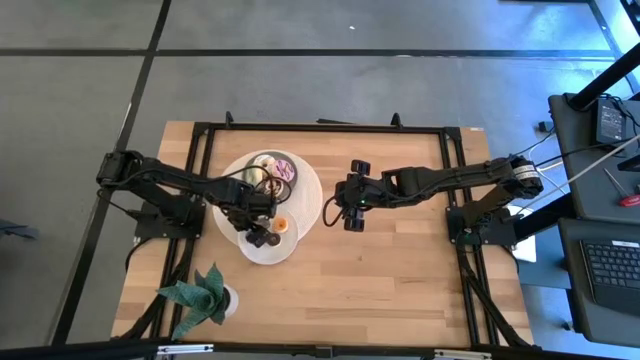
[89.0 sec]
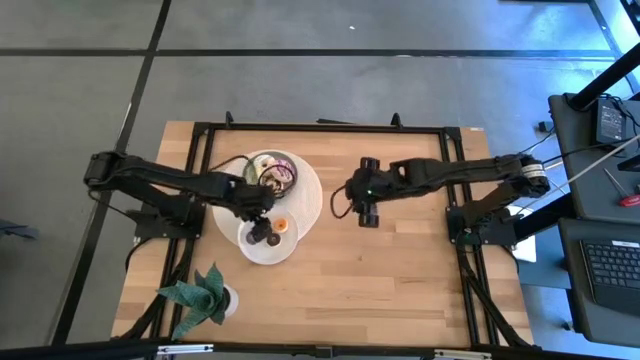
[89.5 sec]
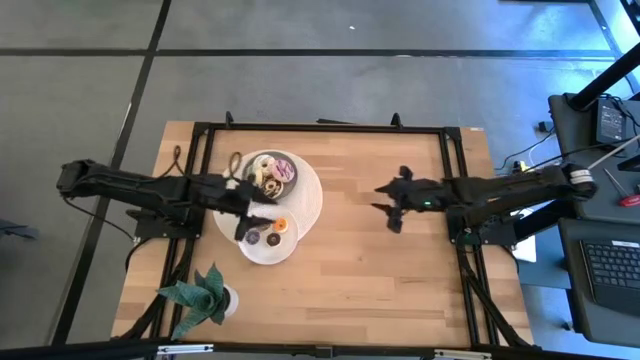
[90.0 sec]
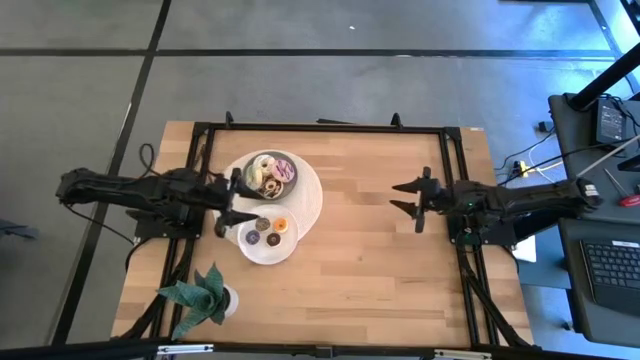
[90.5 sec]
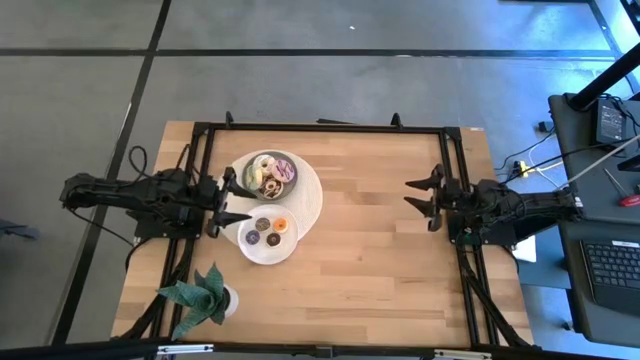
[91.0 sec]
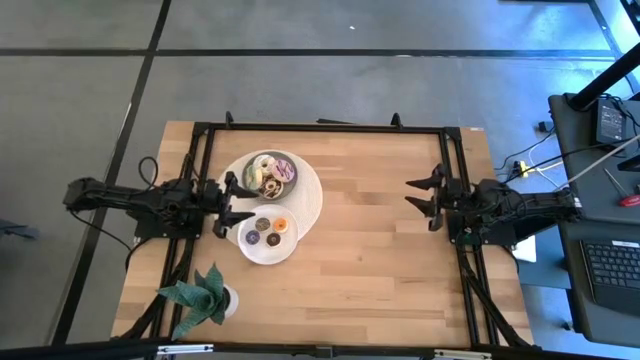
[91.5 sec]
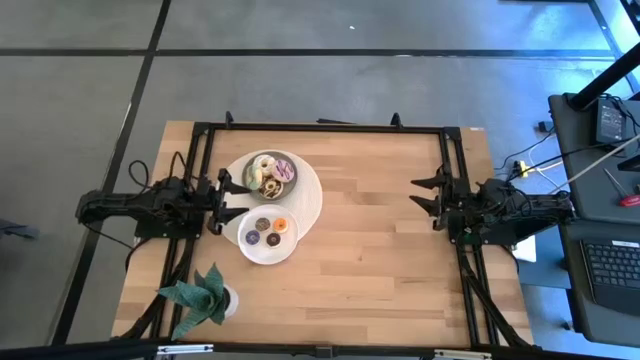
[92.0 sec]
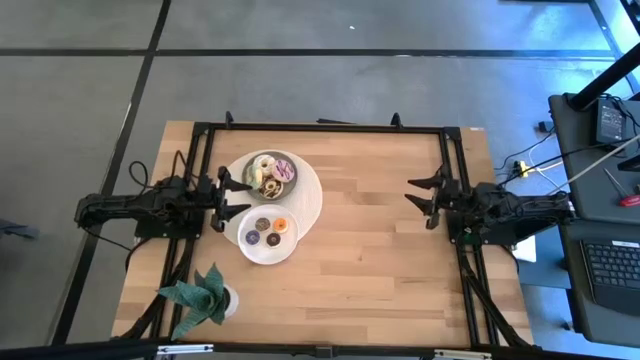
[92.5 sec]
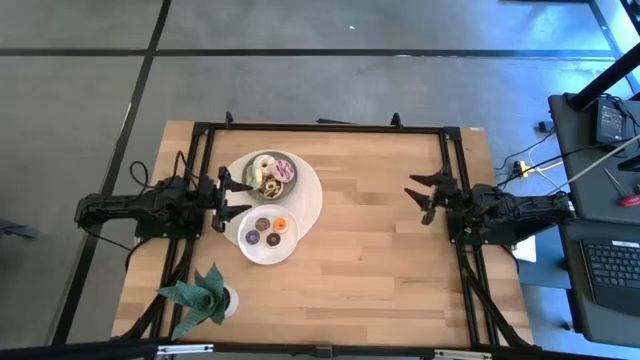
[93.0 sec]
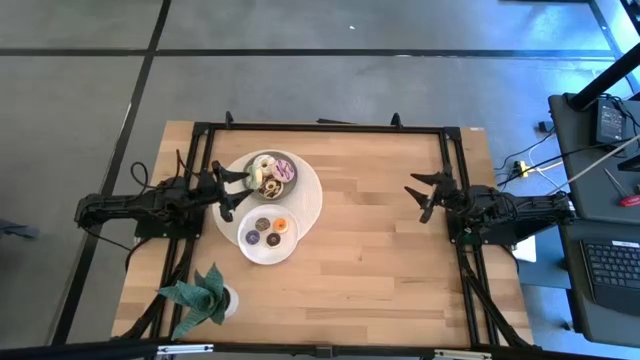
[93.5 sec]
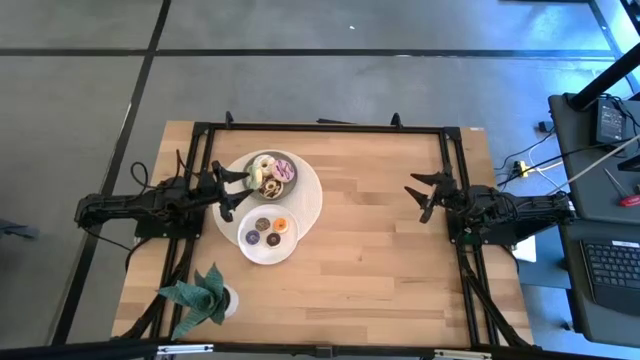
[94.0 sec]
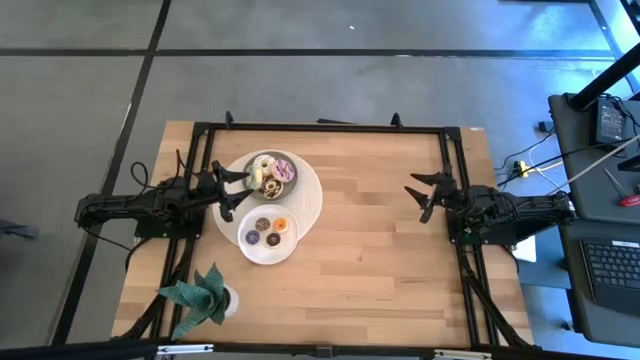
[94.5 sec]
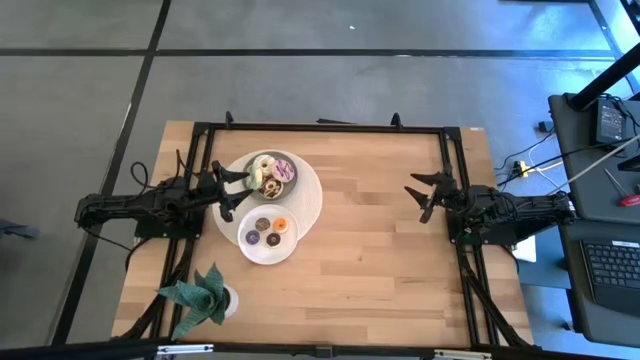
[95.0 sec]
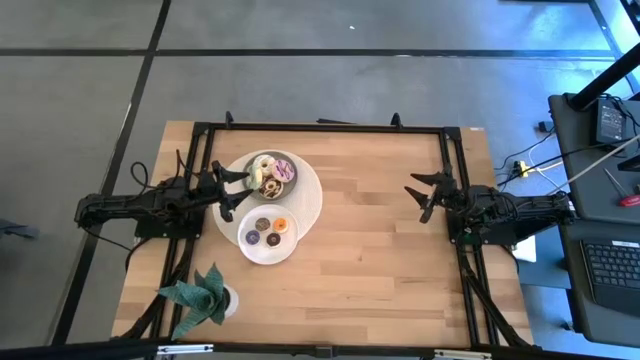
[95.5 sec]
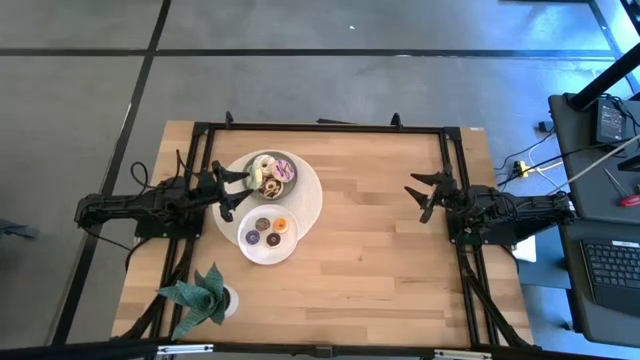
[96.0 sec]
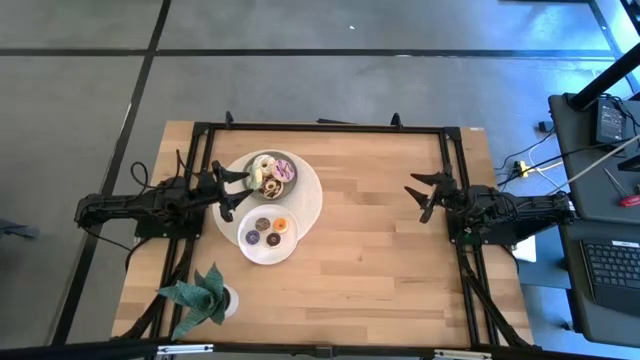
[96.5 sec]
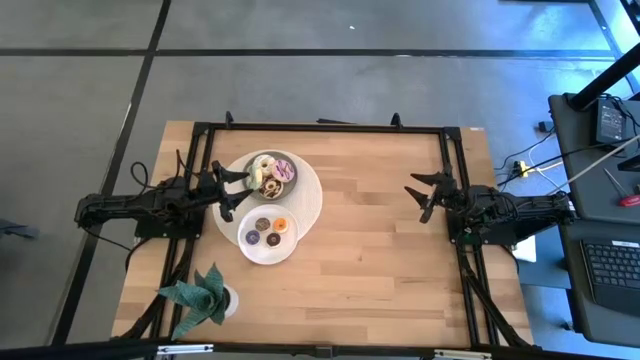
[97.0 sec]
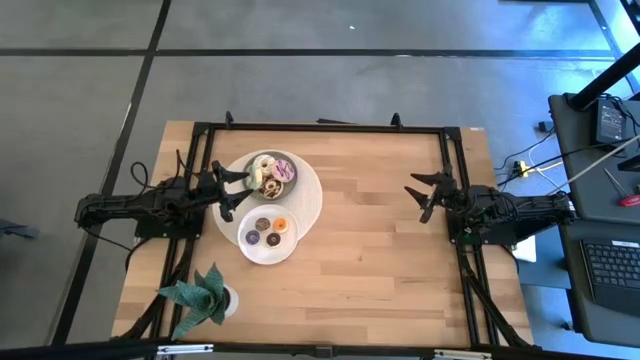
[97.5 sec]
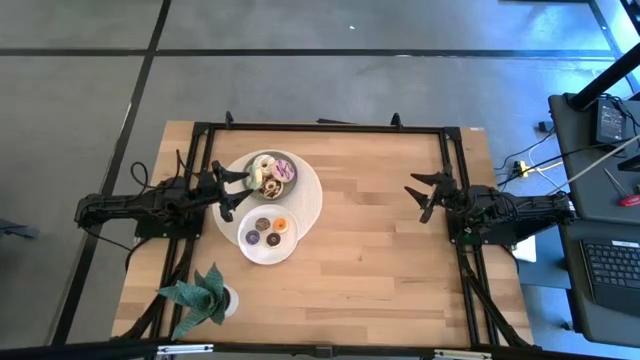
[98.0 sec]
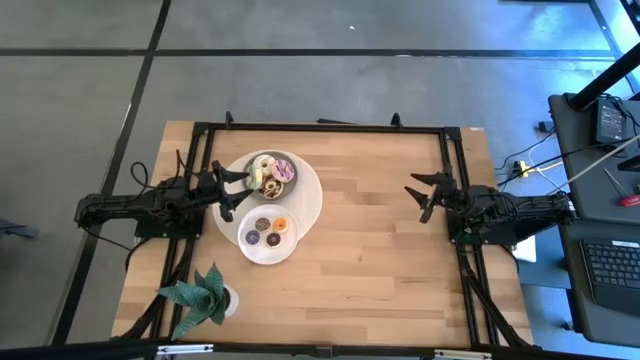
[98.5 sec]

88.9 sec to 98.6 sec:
Task: Pick & Place donuts
Return to Home Position

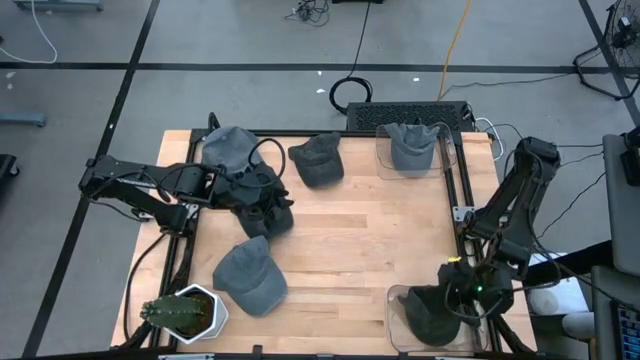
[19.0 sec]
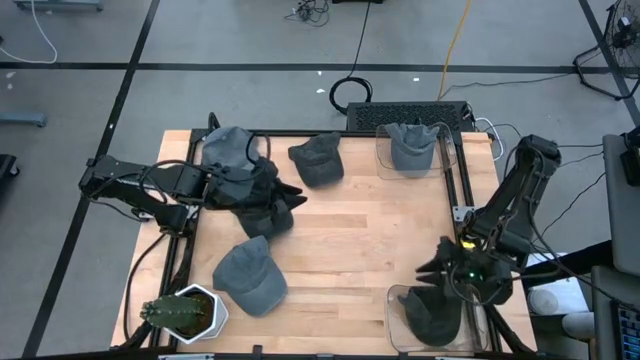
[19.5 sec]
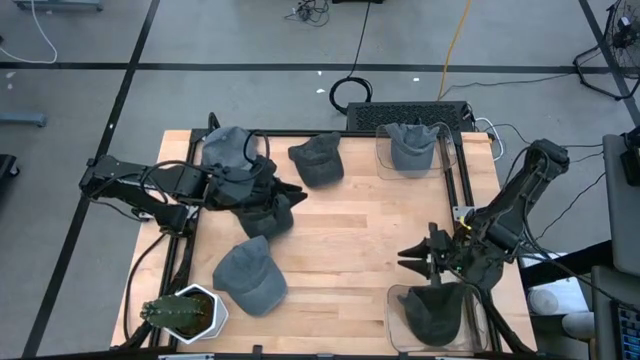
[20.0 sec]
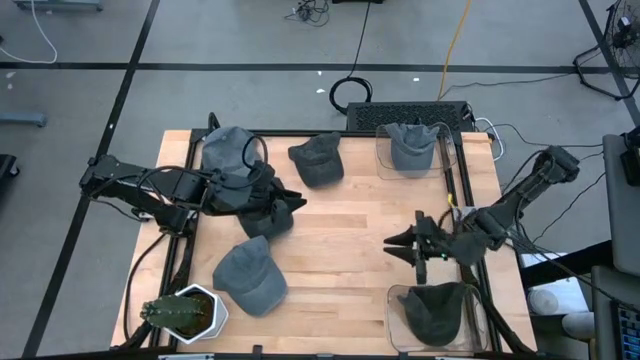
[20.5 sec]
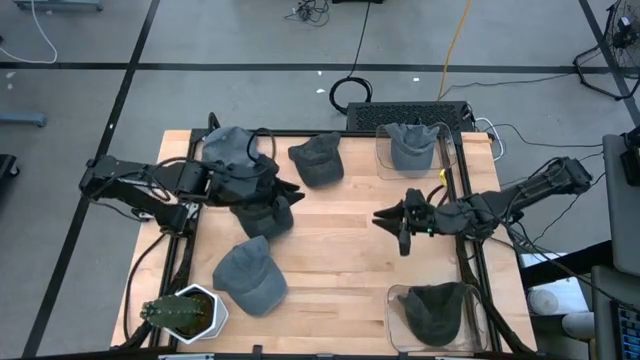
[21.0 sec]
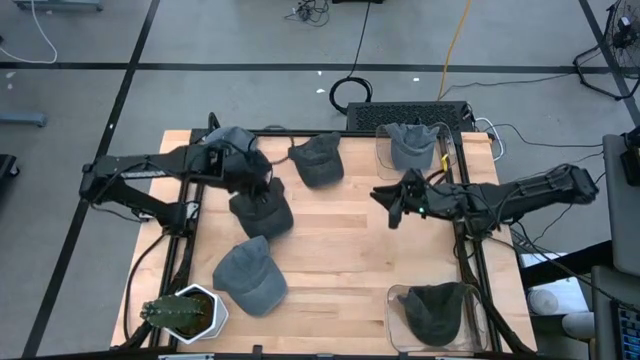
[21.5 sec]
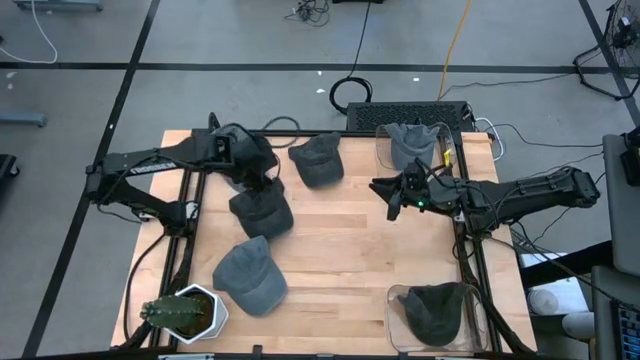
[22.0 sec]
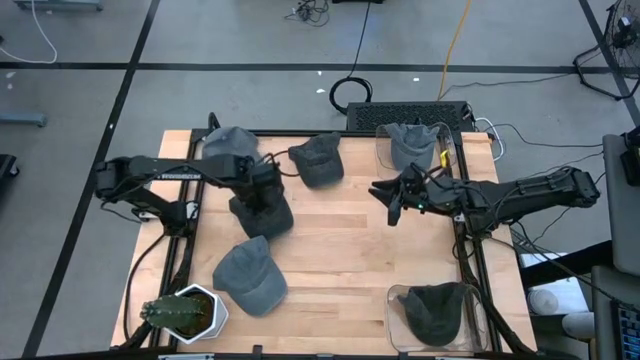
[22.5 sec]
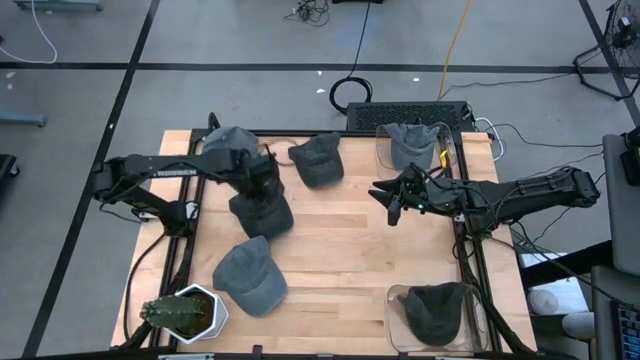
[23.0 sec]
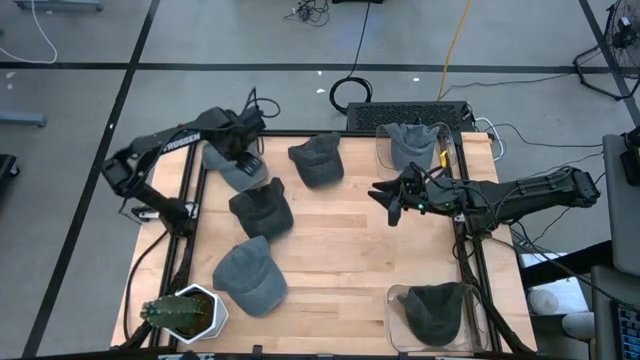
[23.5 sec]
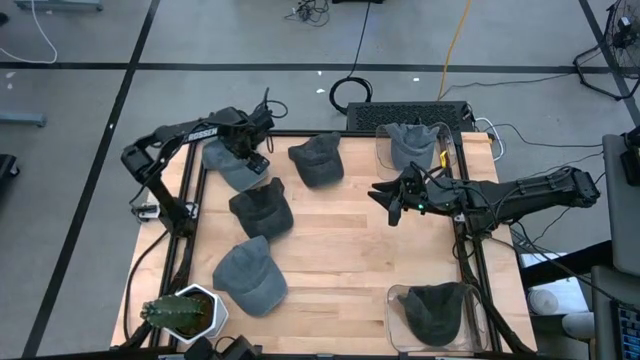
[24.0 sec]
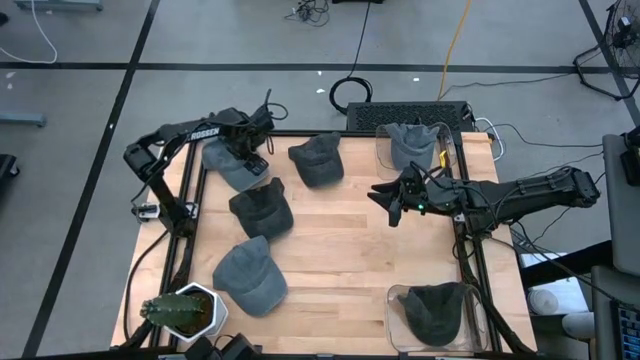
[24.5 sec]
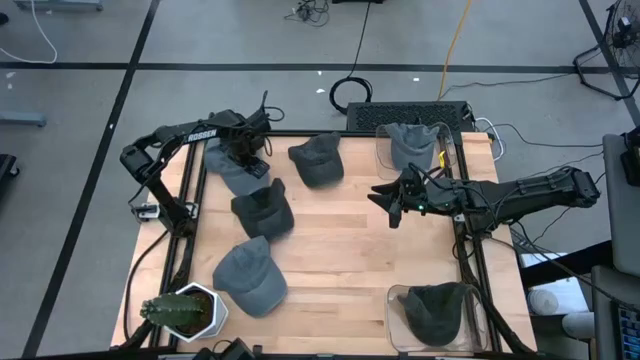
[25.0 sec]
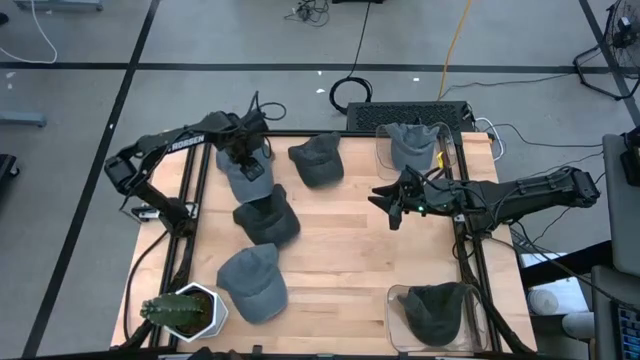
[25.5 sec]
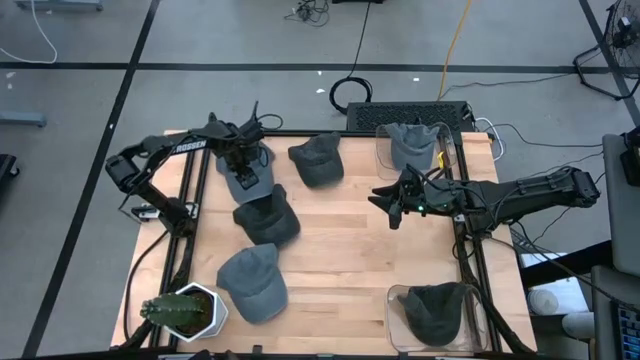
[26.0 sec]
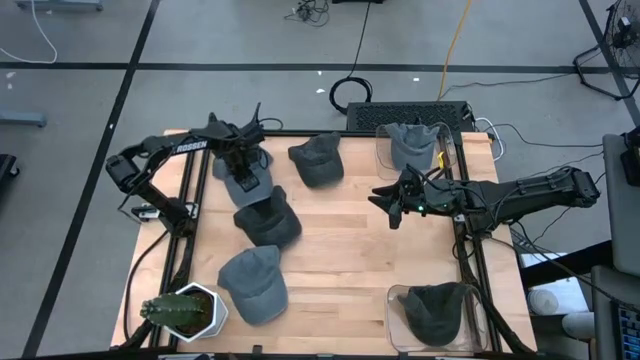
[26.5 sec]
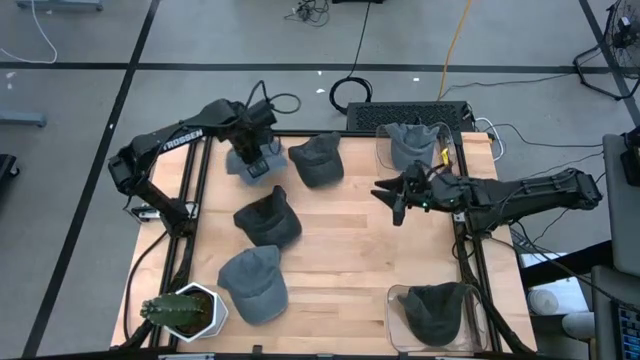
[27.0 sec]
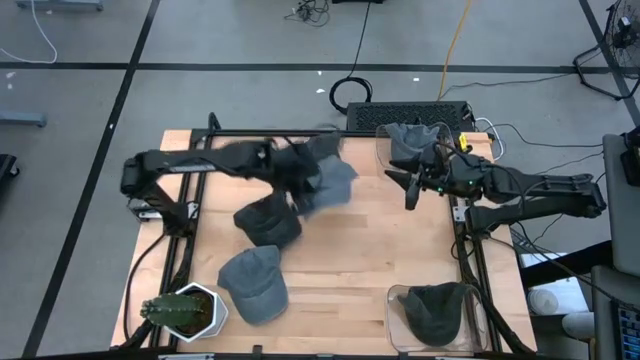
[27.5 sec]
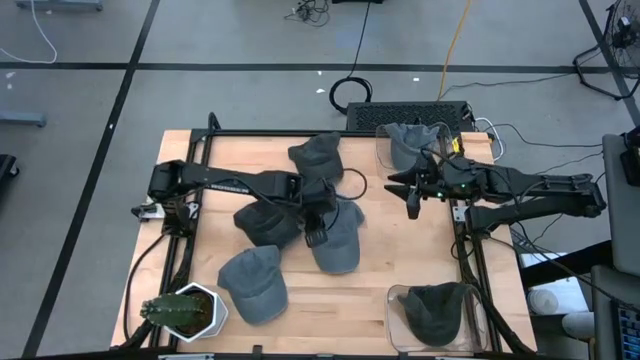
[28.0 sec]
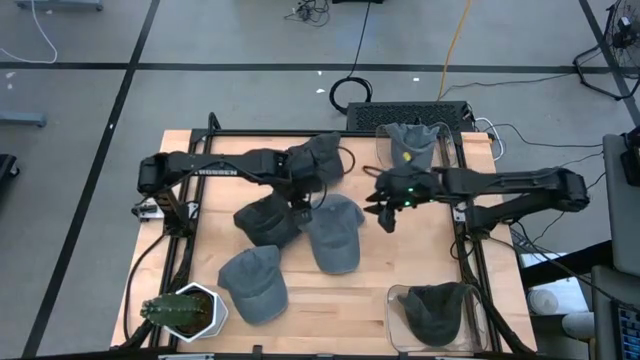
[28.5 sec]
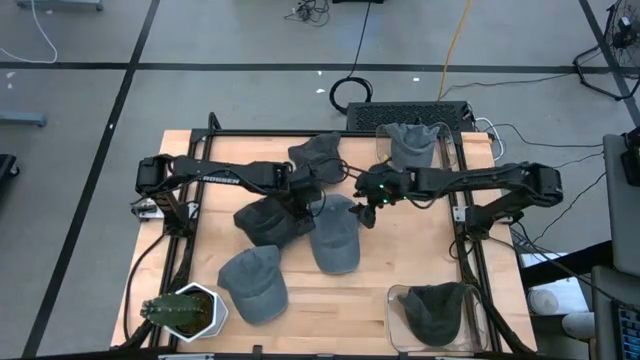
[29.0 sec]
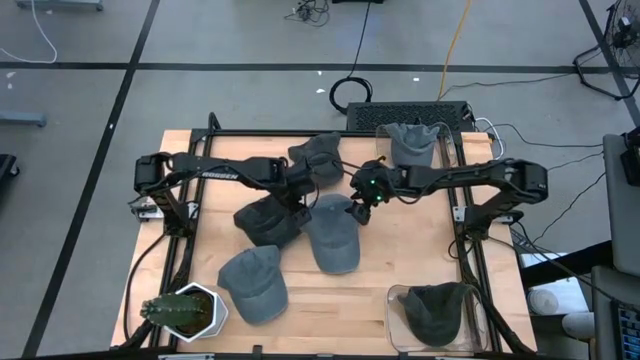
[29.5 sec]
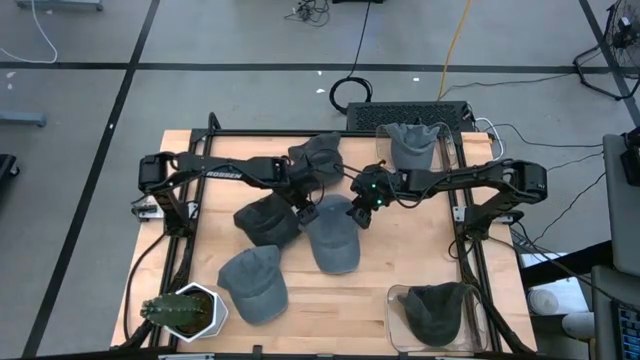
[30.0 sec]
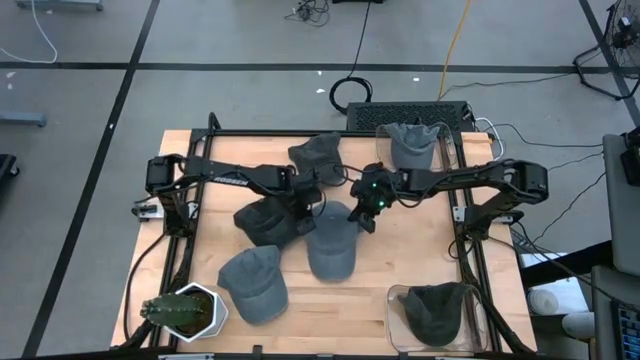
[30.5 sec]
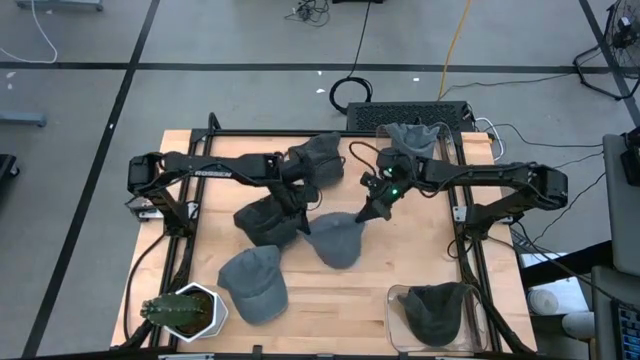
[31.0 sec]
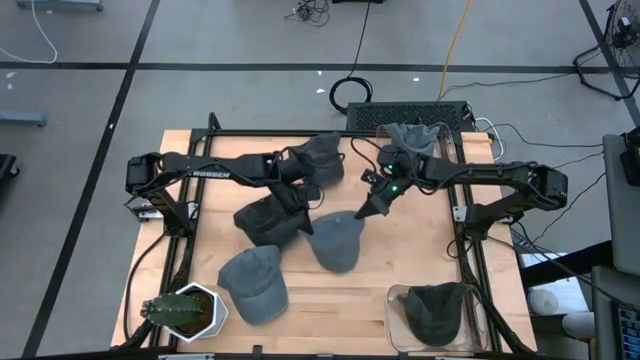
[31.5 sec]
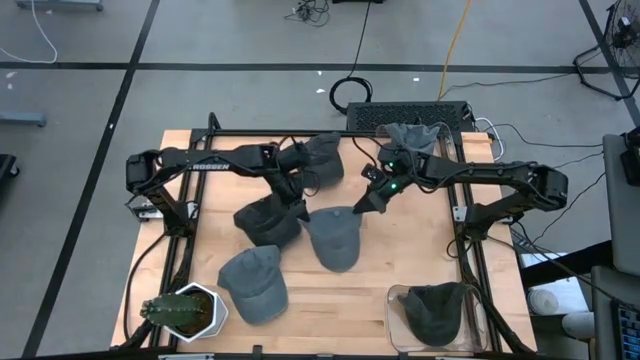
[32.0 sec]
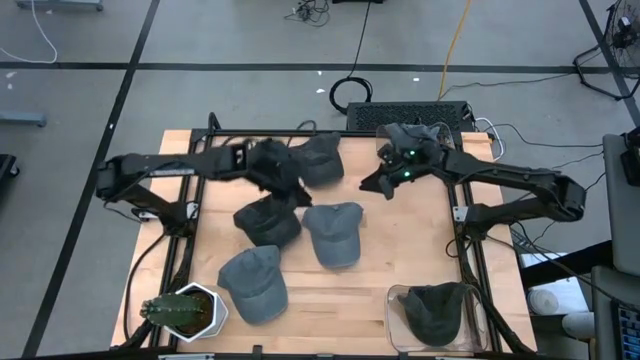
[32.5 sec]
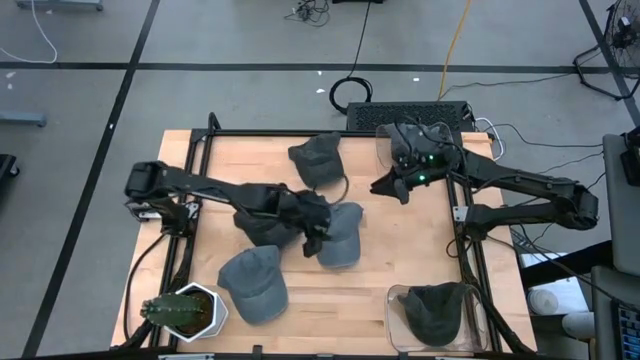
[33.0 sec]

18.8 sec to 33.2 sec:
Task: Pick & Place hat
Put the top gray cap into the top transparent bin
